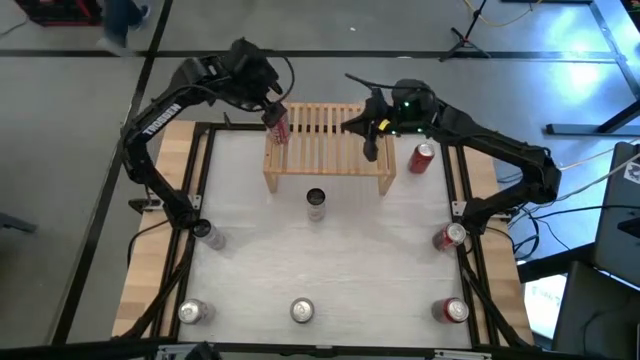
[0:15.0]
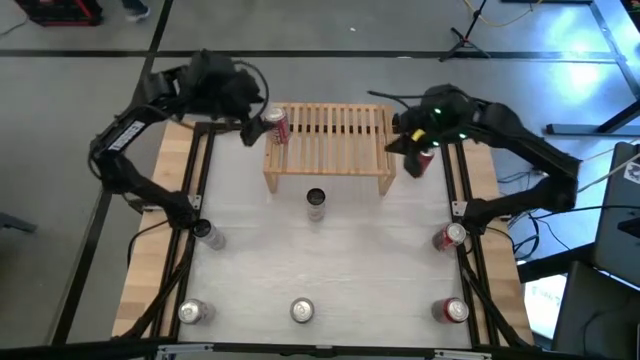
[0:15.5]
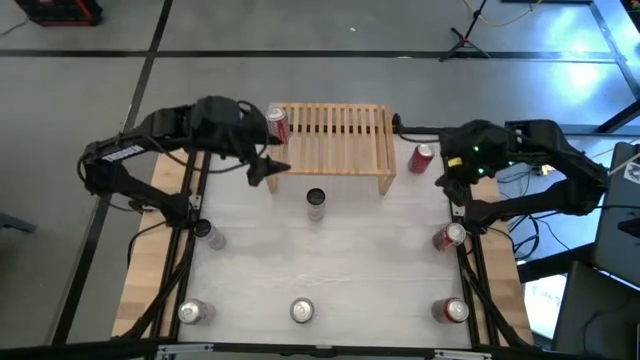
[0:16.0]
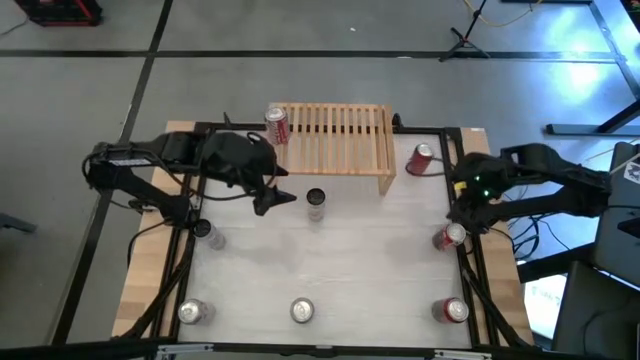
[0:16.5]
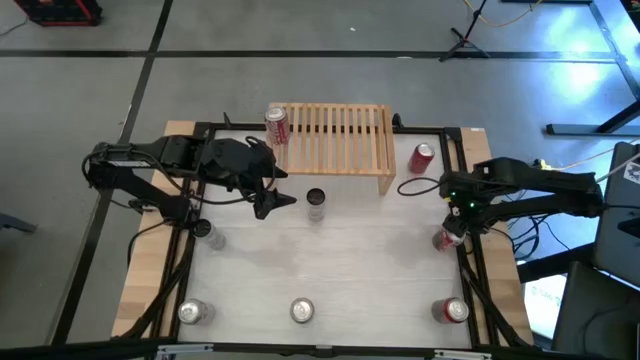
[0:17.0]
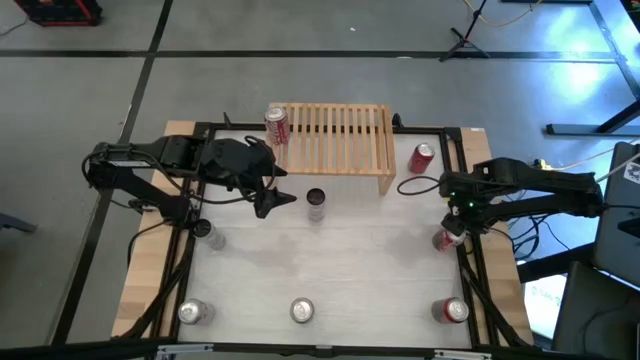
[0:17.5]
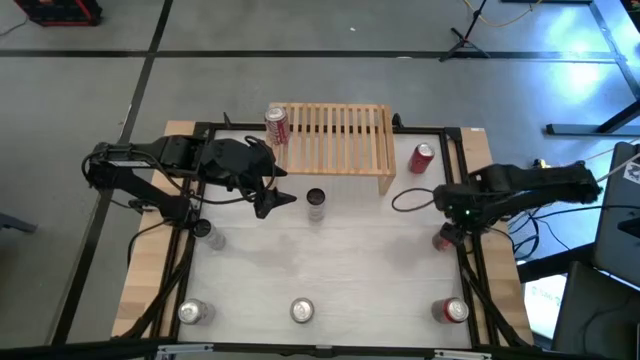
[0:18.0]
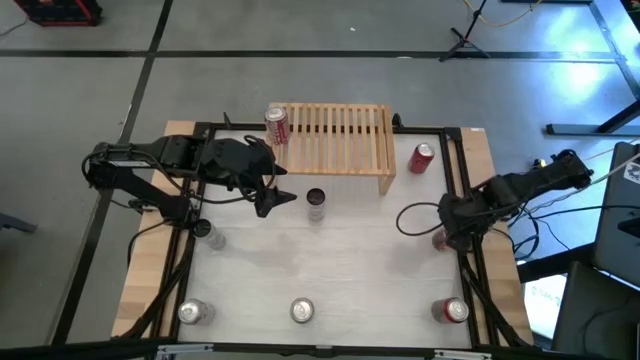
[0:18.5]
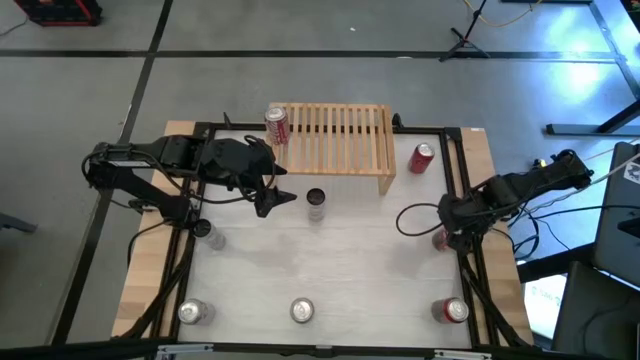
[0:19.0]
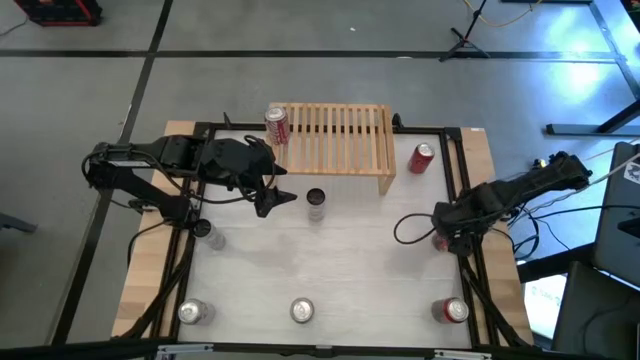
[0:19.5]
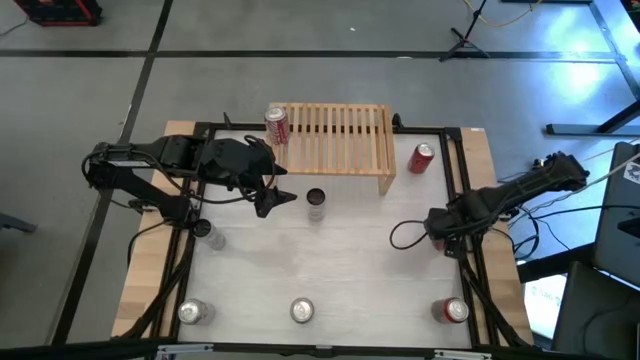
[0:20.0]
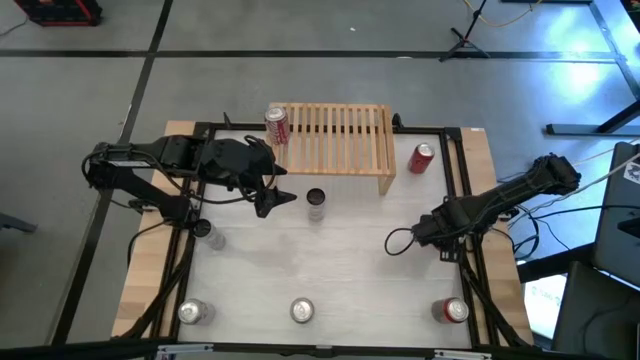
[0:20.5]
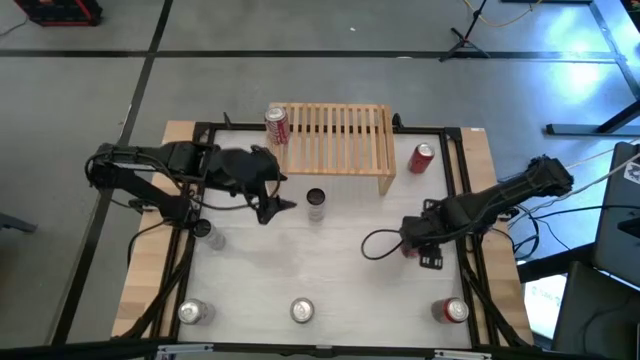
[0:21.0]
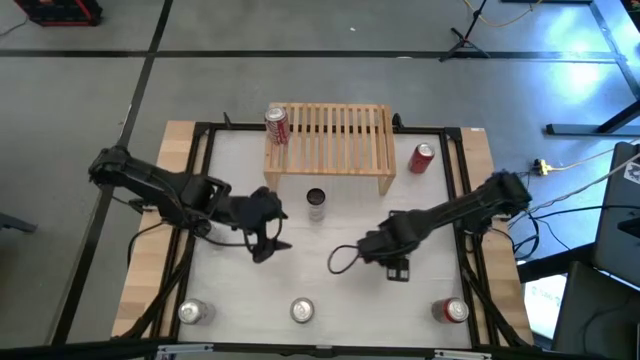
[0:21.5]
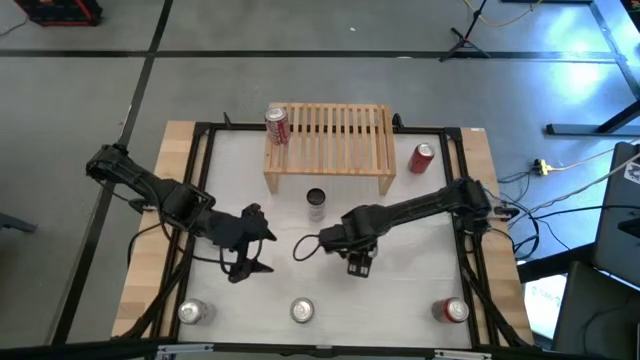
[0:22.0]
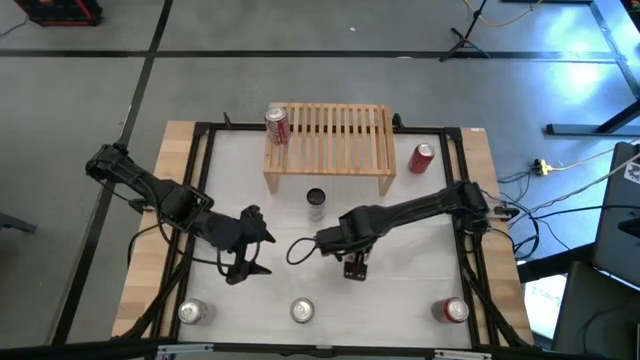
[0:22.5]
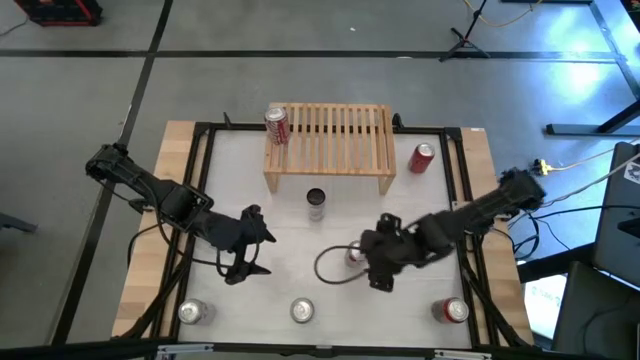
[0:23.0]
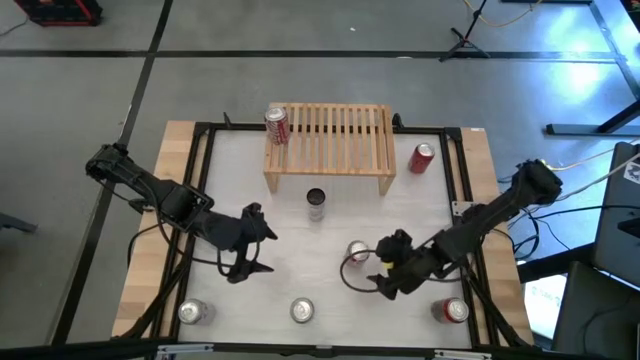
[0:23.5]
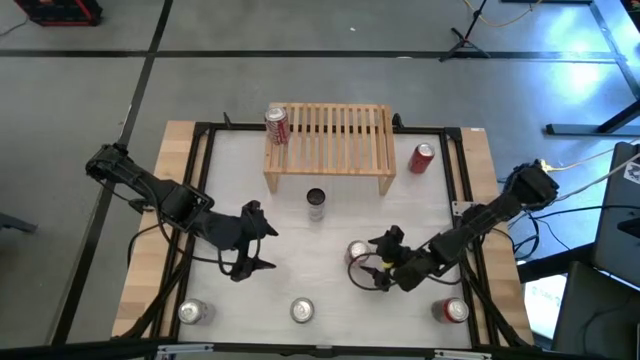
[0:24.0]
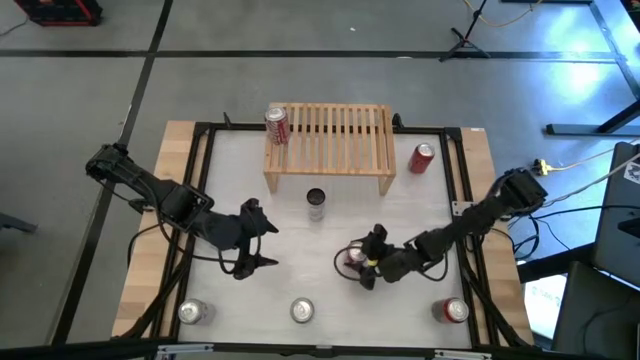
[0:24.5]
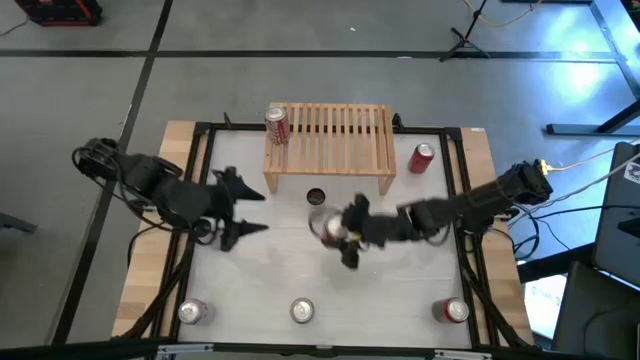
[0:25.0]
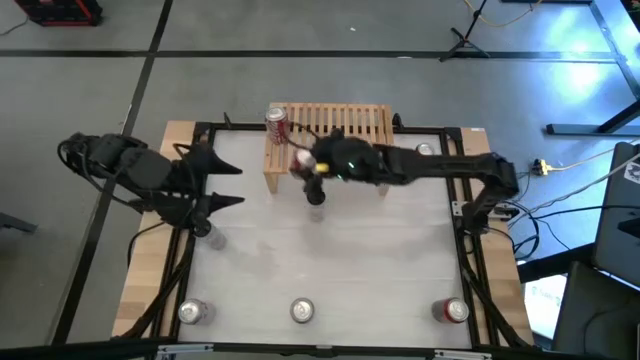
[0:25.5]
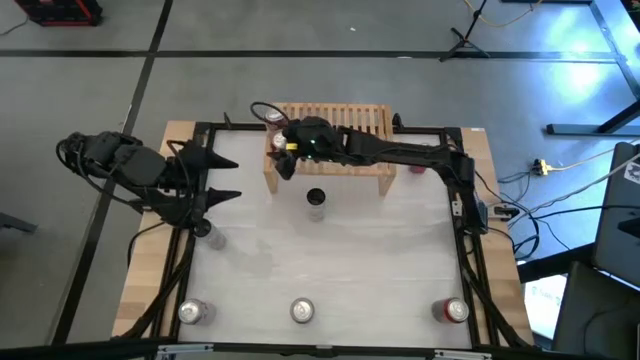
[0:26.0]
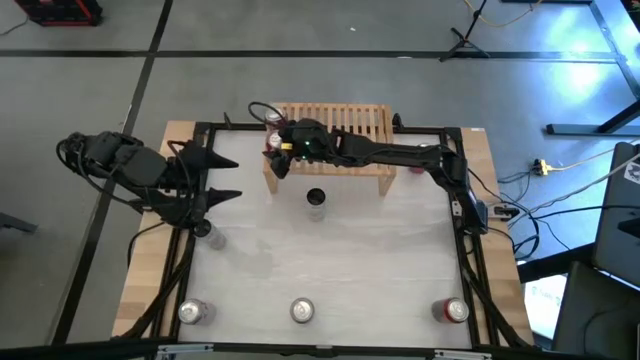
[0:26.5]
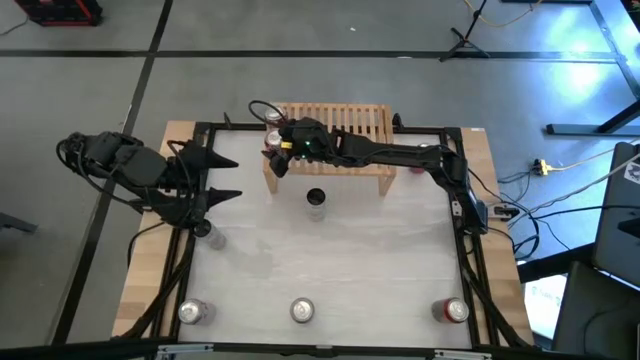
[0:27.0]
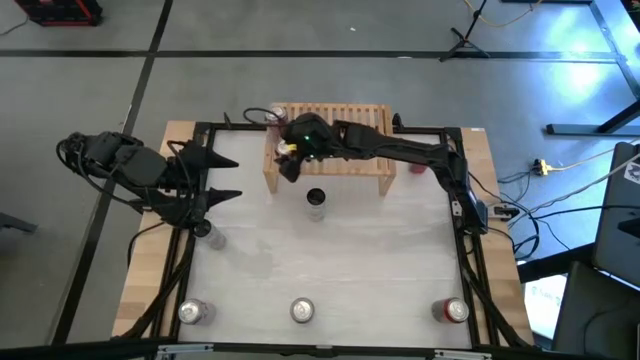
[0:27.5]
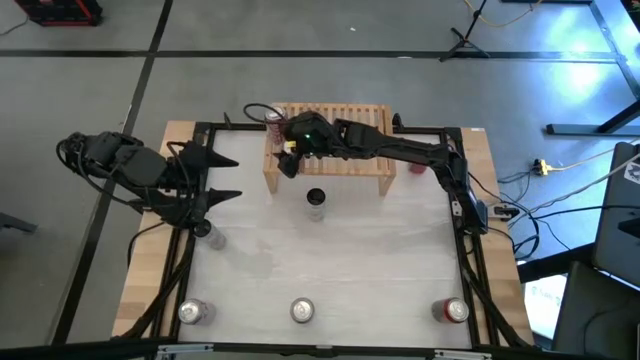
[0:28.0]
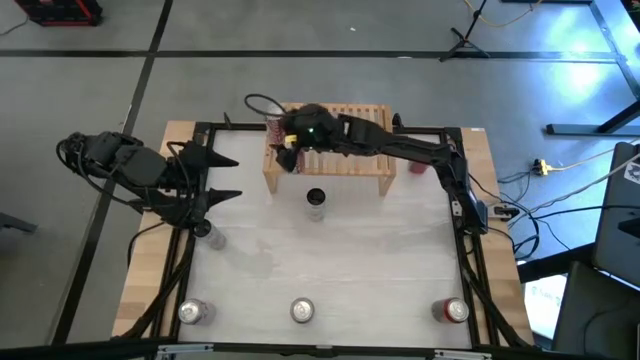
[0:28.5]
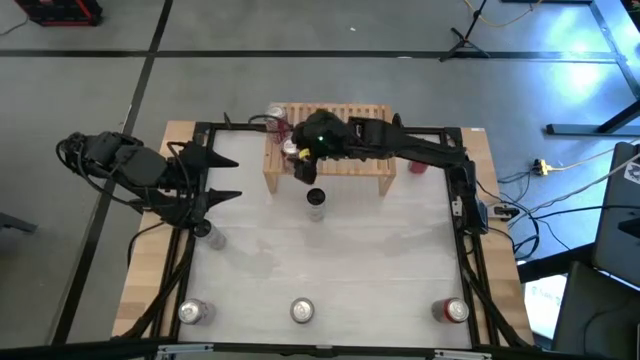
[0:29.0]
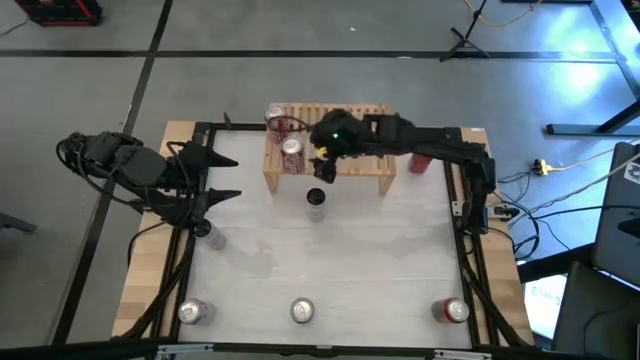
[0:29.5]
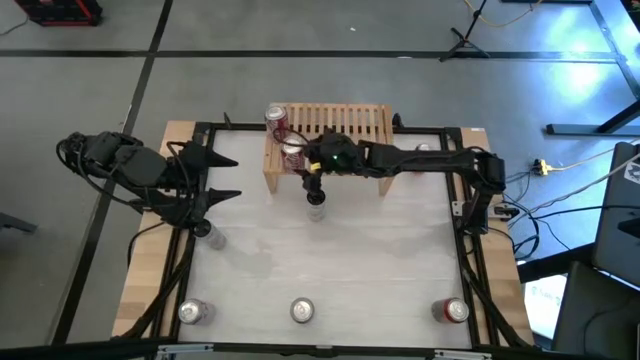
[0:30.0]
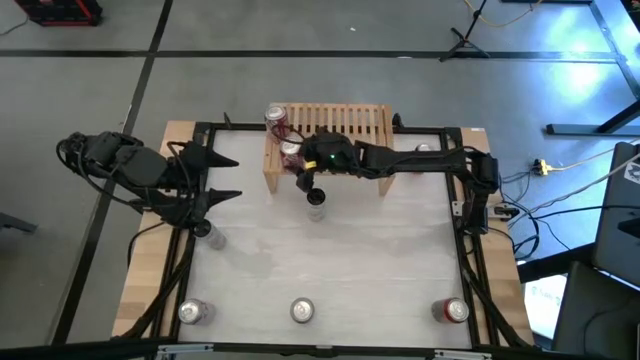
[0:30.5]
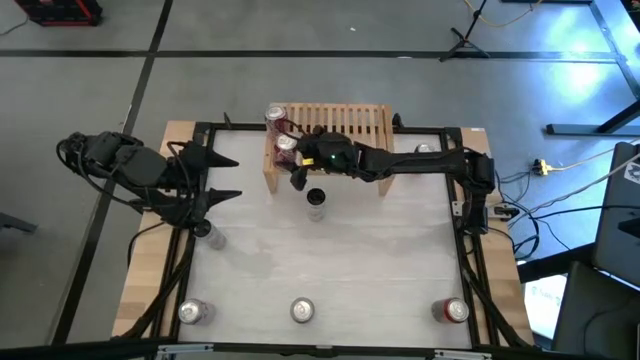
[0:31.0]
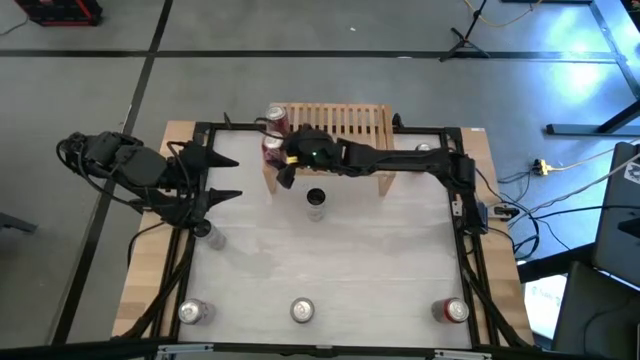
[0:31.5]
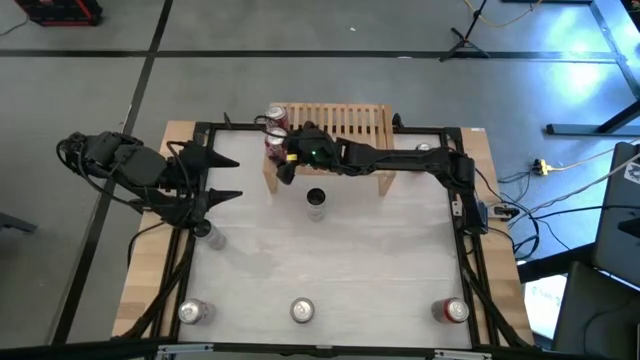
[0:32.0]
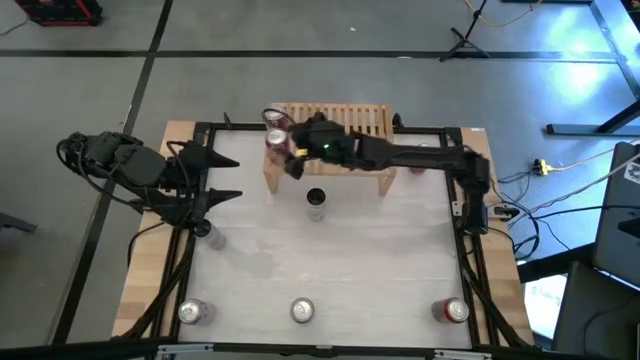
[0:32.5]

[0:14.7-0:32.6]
Task: Place canned beverage on shelf
Put the red soda can on the shelf aligned with the red soda can

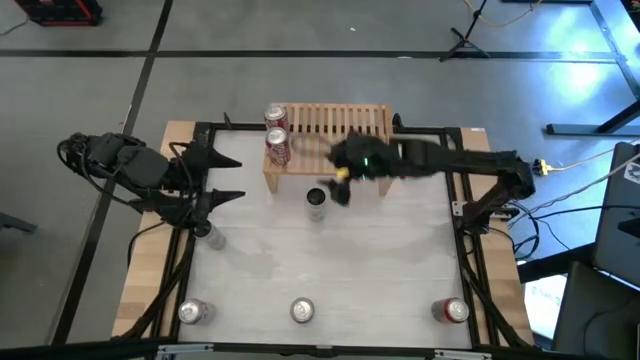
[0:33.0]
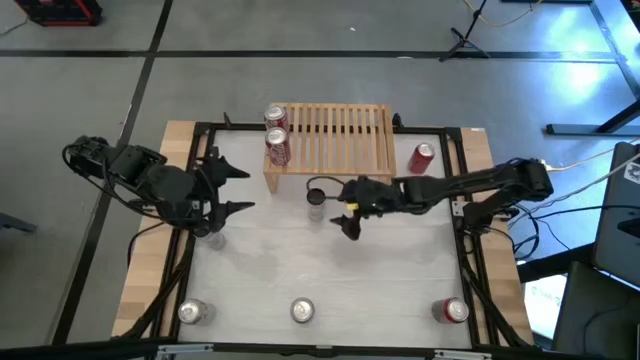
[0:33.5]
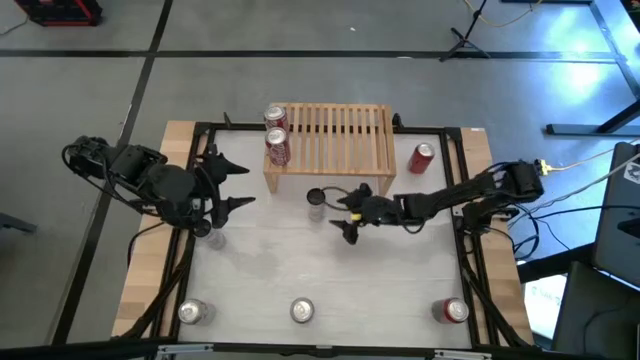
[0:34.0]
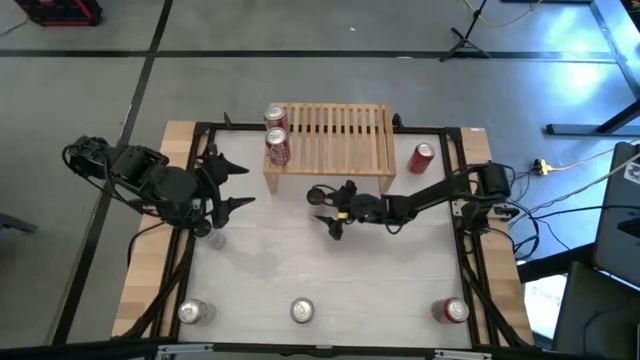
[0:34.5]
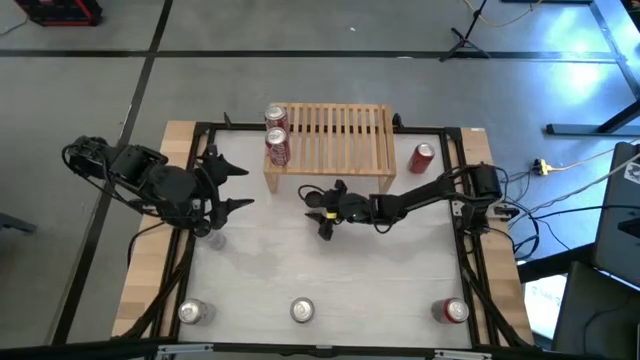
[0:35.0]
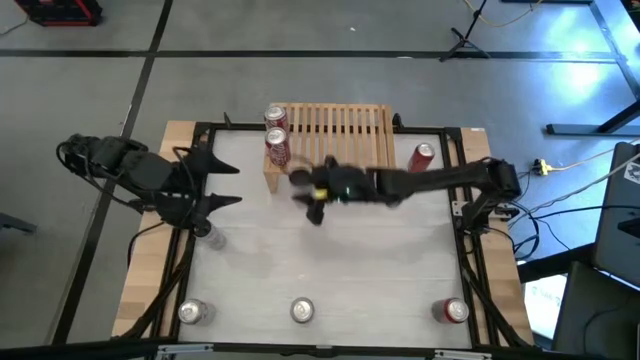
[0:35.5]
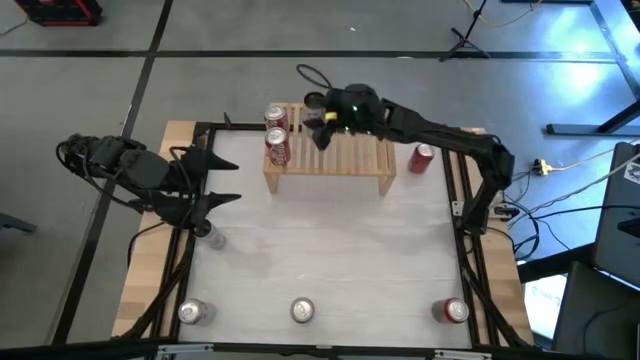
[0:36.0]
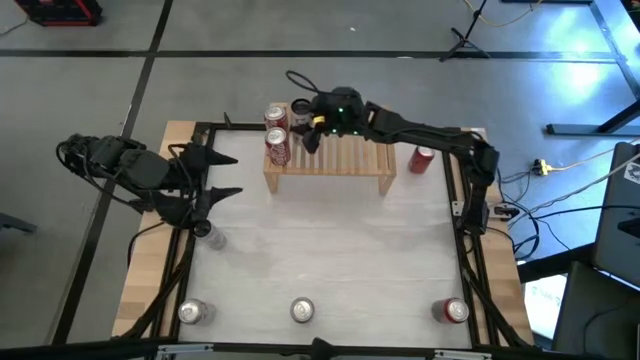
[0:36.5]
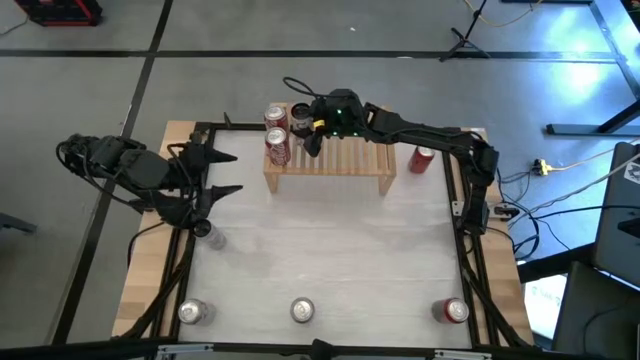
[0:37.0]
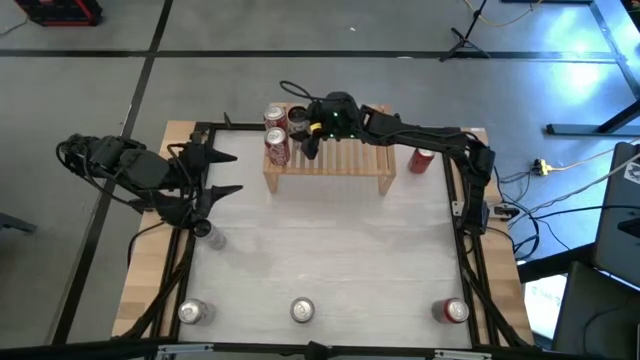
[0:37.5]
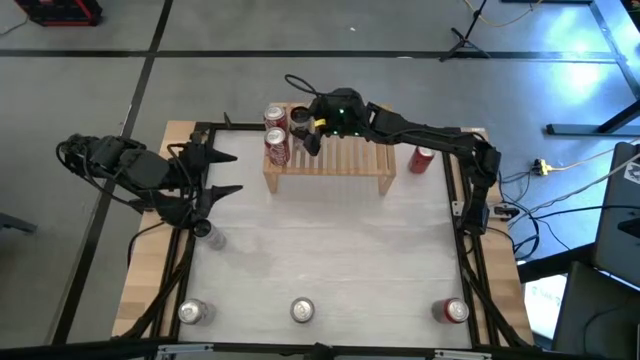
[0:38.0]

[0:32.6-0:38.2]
Put the right black soda can on the shelf
